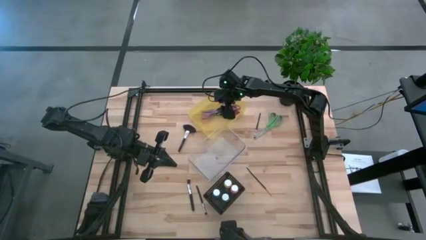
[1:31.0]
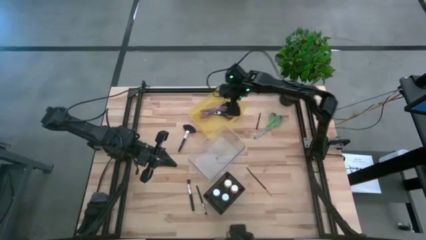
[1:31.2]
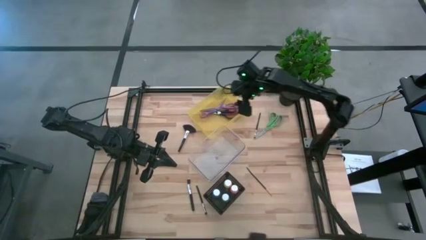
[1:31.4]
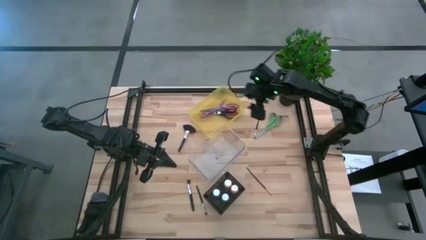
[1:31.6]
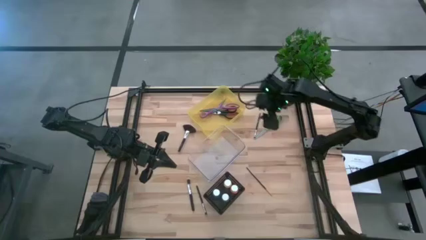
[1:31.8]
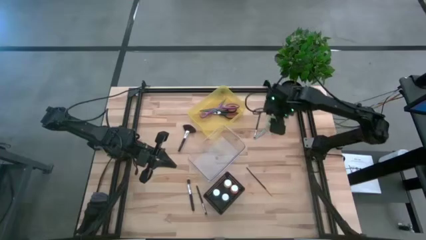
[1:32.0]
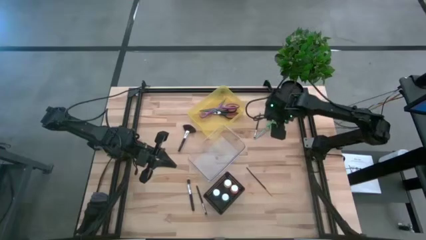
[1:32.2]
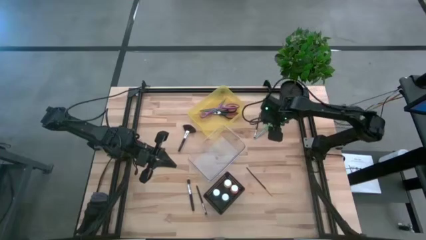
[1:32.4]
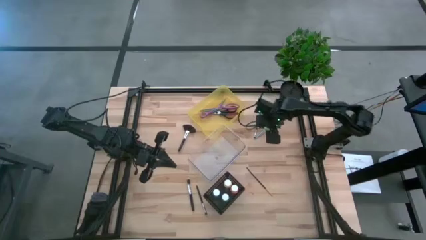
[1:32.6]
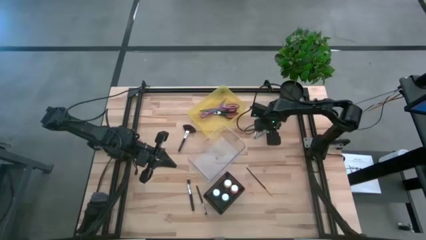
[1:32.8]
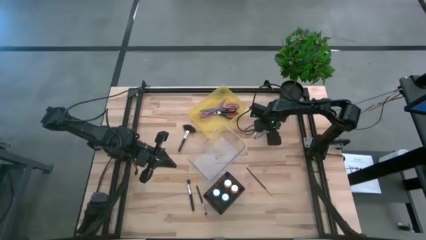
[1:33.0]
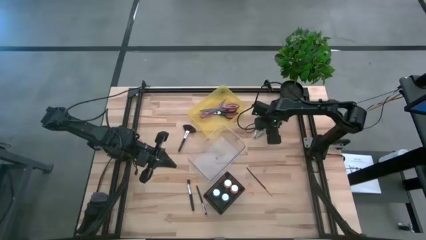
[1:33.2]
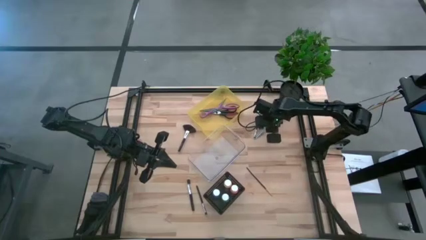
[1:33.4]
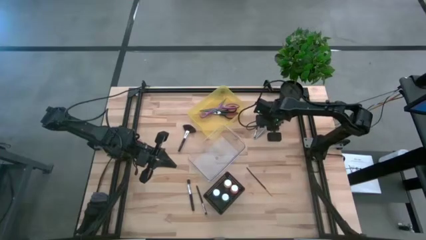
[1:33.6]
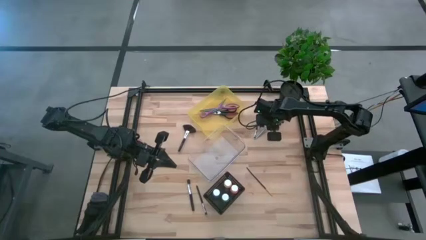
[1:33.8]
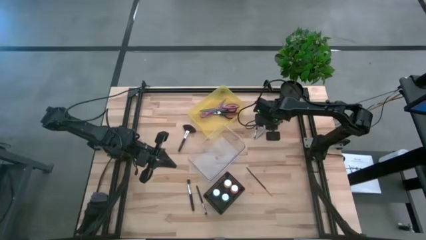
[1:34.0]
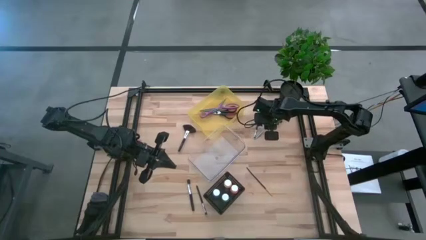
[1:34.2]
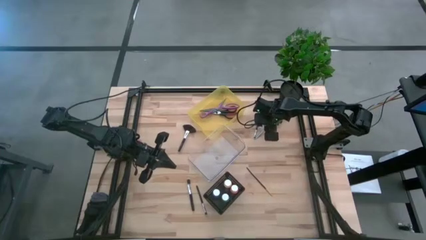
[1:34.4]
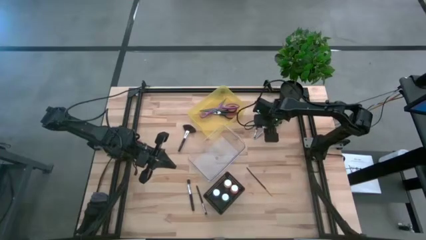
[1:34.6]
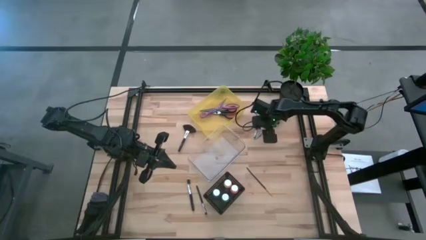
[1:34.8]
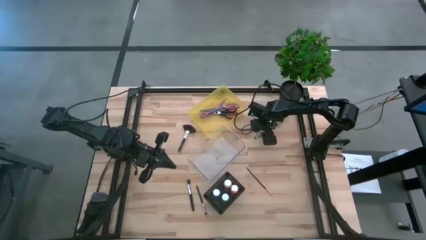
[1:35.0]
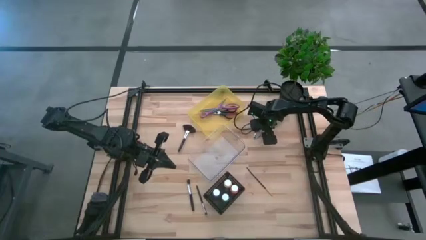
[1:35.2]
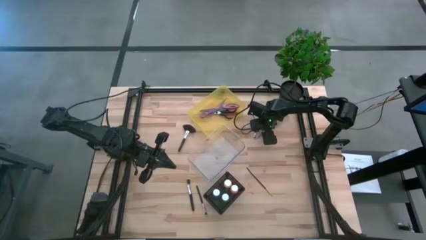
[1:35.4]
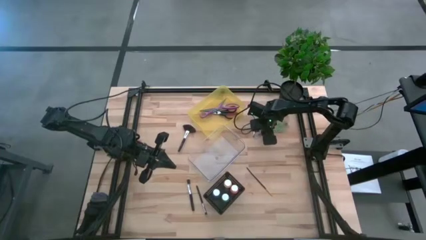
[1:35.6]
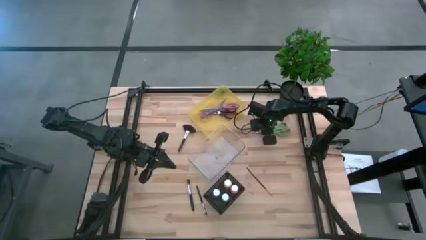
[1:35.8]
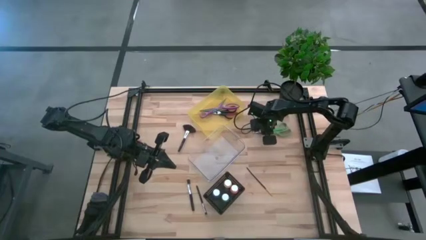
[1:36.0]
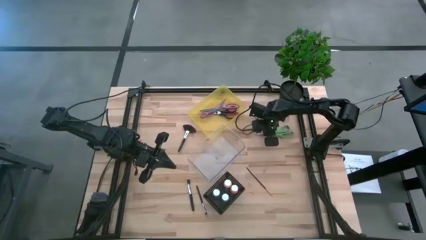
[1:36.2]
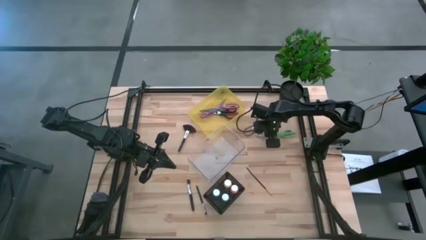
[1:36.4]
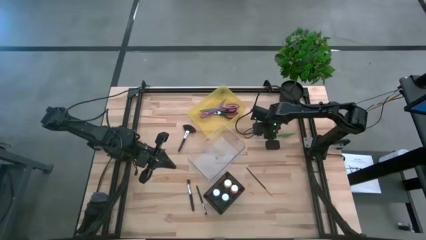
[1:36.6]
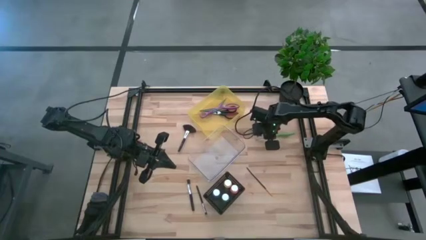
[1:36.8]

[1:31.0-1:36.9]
Task: Pick & Place Paint Supplies
Put the green scissors into the yellow transparent bin

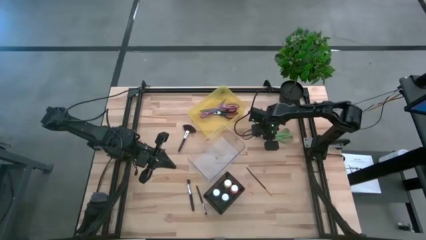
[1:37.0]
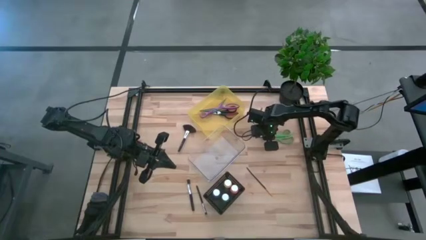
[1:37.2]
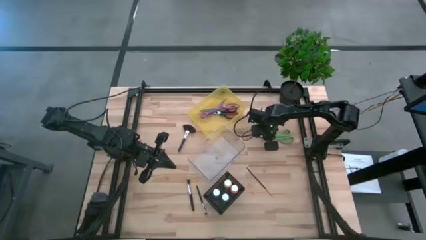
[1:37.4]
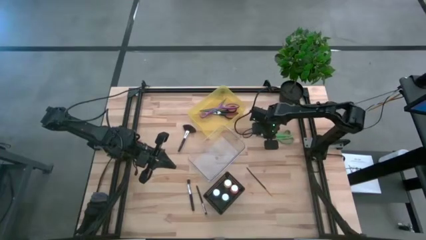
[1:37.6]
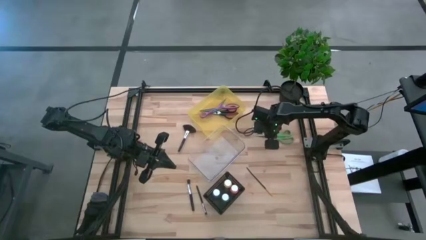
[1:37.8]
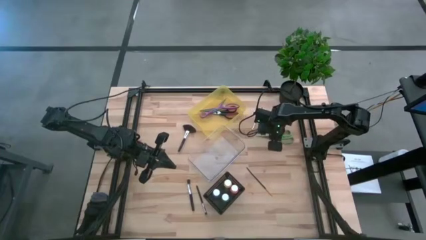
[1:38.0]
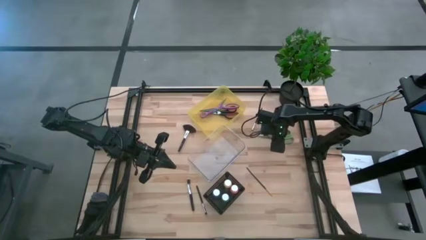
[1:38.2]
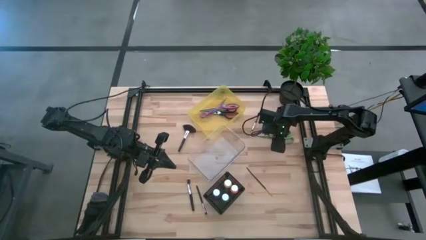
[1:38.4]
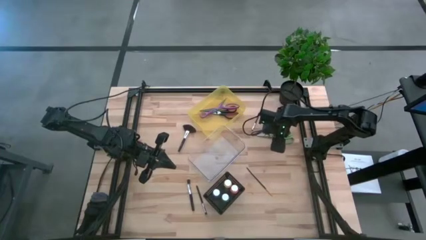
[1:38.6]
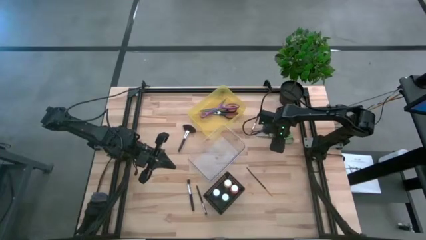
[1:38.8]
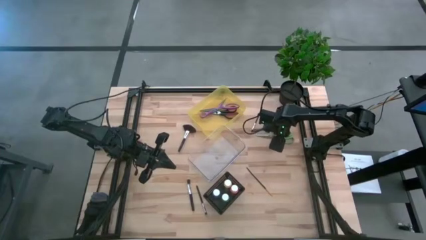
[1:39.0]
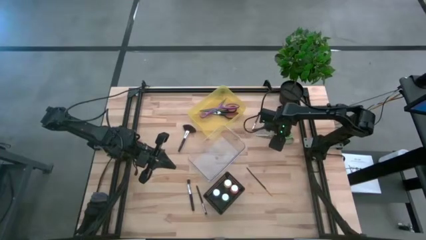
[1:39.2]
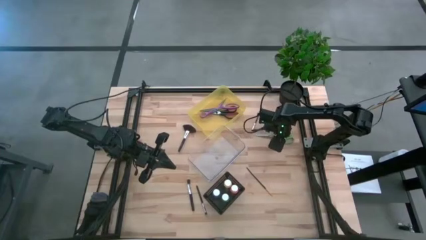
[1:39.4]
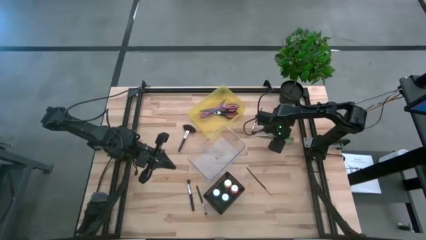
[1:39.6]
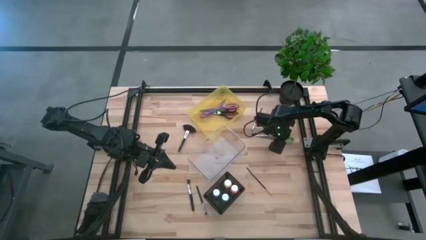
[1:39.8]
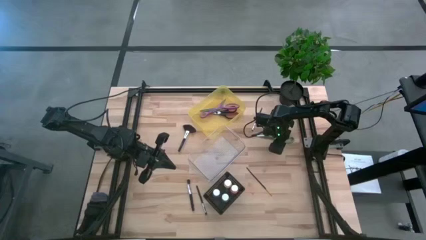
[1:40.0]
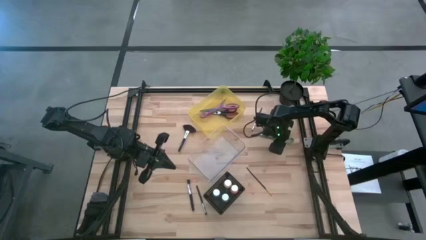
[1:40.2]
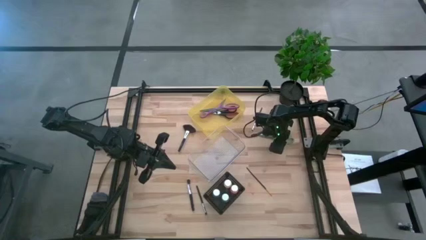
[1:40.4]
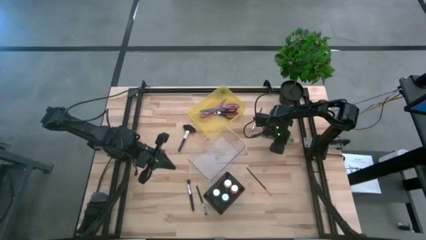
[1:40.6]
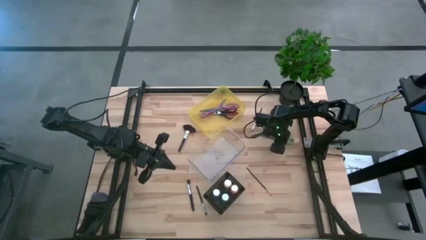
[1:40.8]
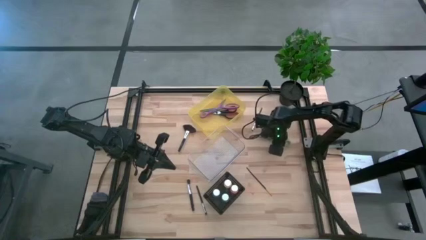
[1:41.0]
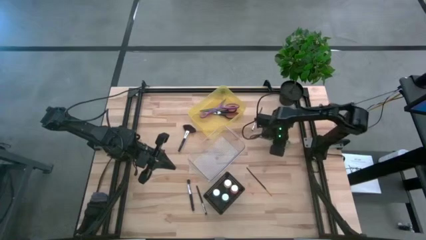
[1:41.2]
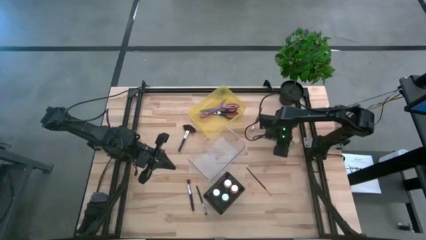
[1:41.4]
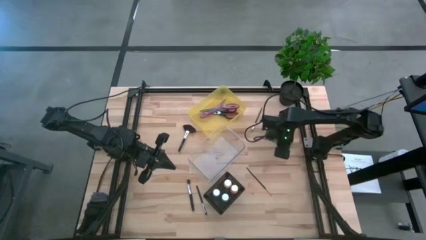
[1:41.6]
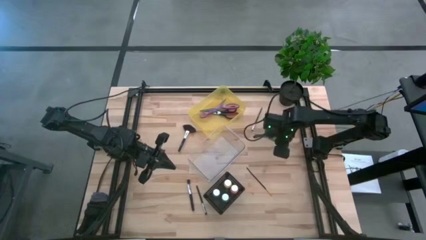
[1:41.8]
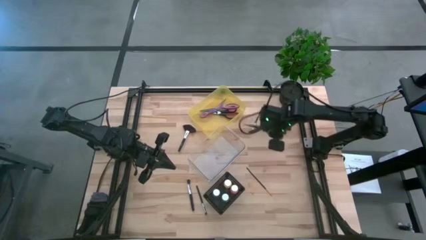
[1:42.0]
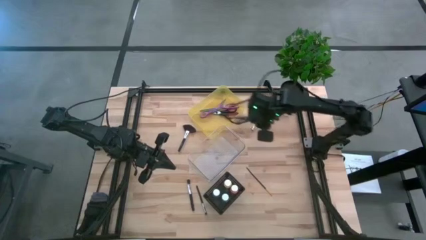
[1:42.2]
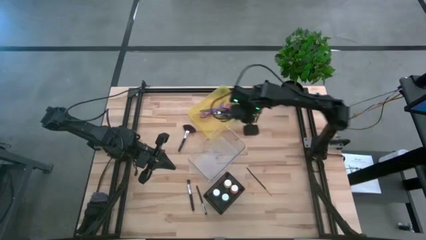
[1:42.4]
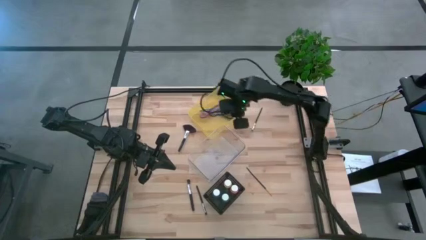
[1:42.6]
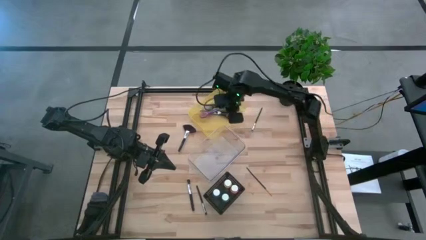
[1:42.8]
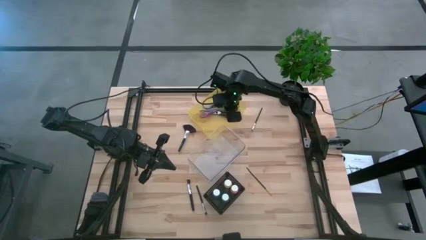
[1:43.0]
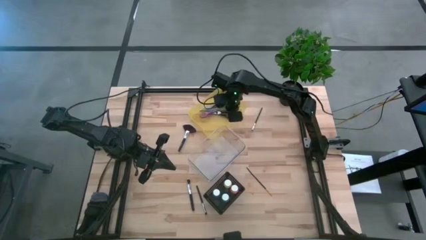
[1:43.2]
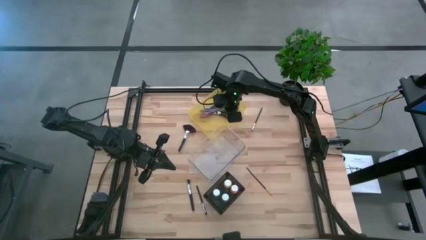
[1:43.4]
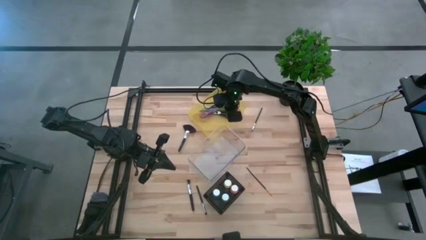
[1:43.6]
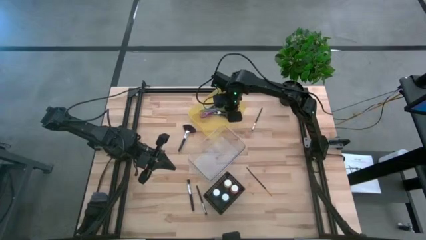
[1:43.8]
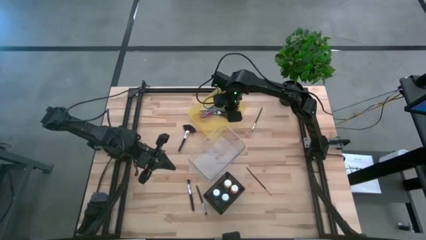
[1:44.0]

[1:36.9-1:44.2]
Put the green scissors into the yellow transparent bin

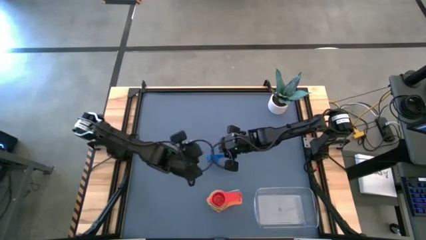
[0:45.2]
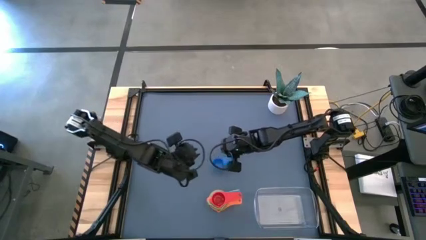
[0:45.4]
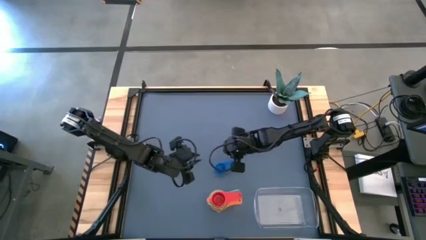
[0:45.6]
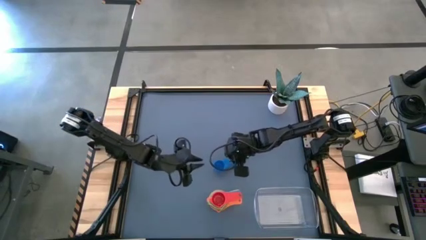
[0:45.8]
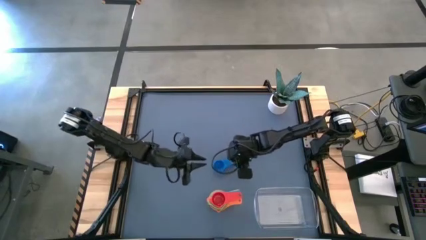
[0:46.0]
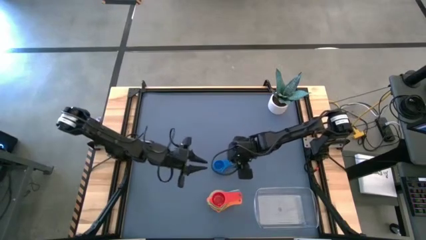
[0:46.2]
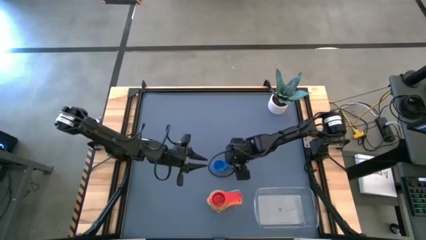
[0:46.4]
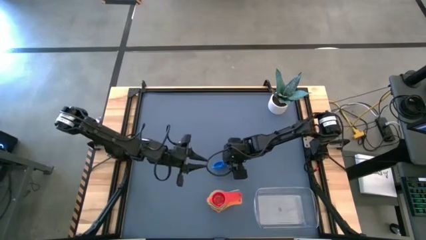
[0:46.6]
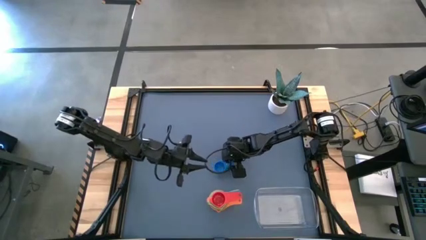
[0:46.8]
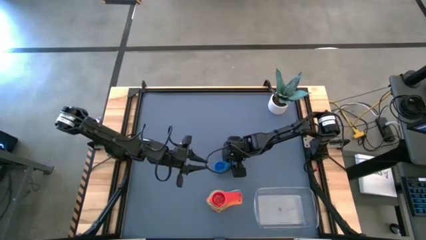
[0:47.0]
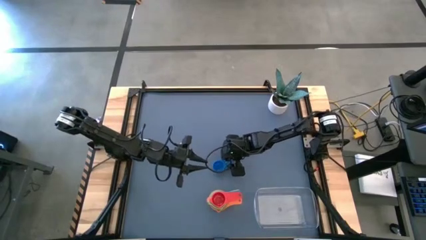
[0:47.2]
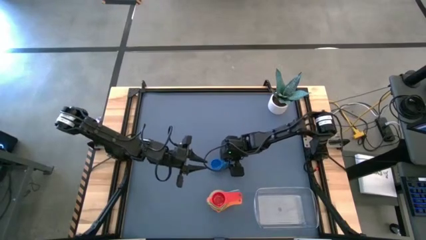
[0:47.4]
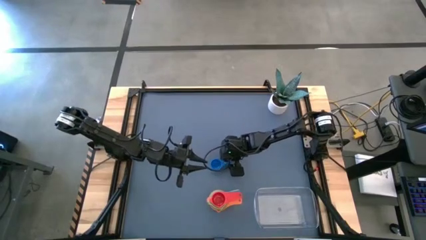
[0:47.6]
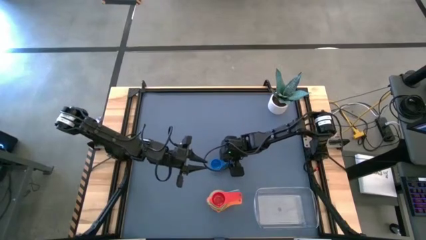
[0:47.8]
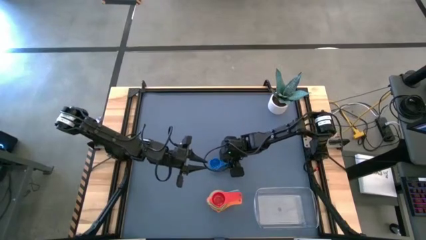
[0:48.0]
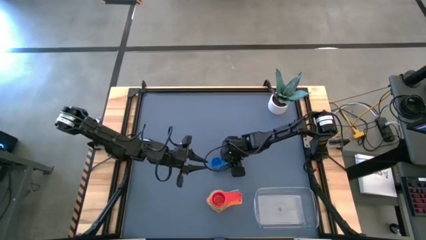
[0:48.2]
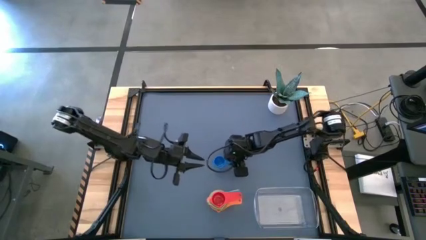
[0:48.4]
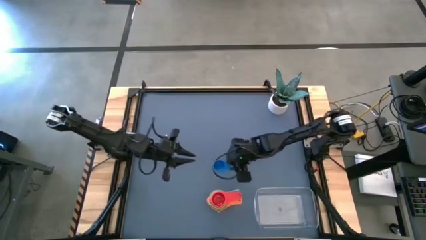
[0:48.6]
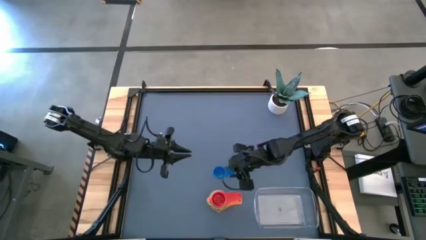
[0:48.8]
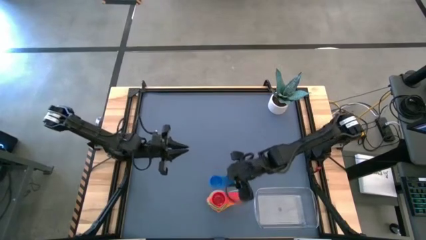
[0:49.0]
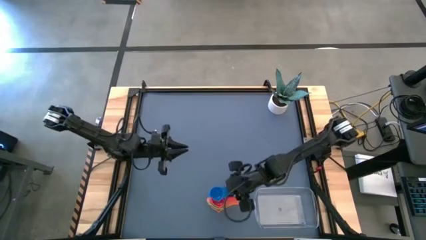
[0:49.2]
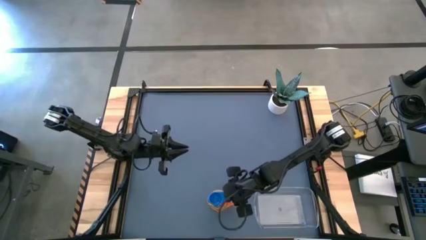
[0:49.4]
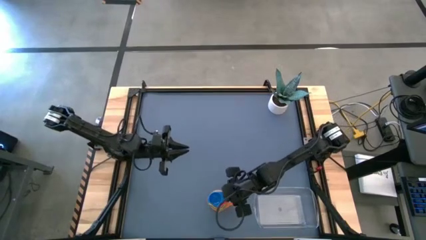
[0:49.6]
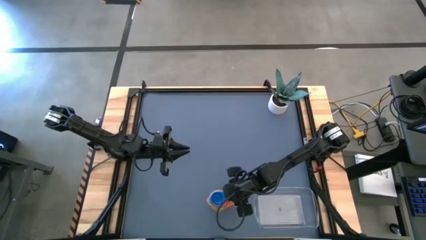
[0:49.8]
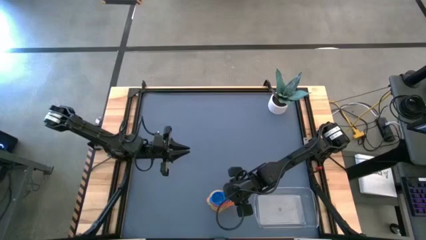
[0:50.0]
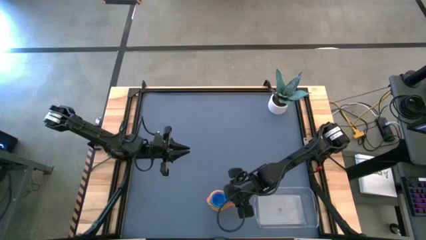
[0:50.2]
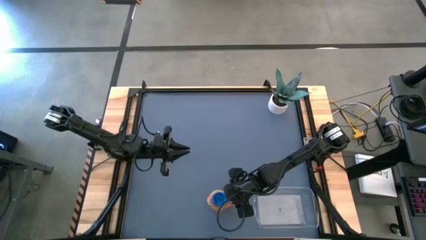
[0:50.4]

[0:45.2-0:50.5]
Task: Nest measuring cups in basket
Stack the blue measuring cup on top of the red measuring cup
